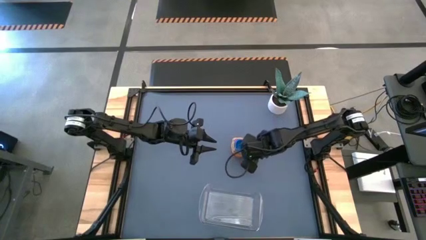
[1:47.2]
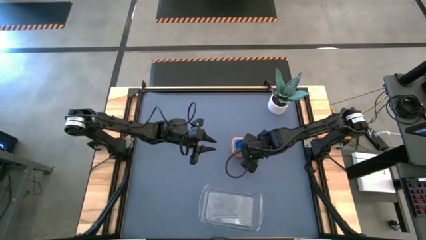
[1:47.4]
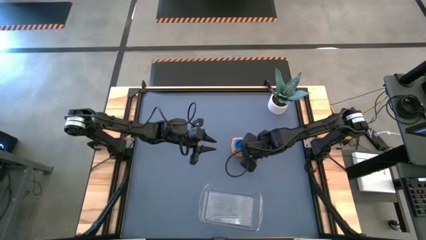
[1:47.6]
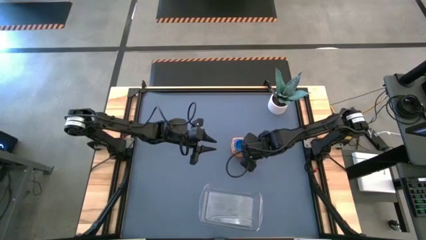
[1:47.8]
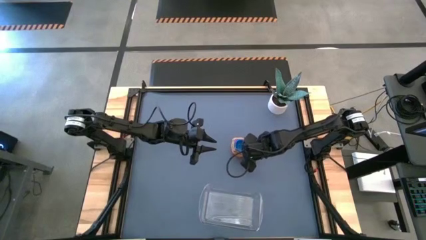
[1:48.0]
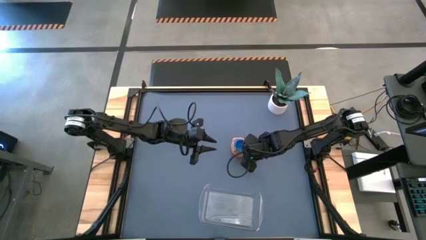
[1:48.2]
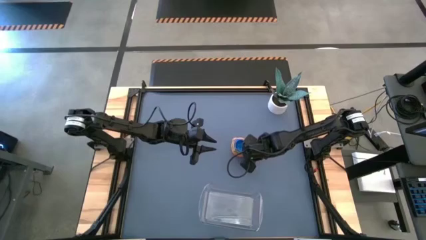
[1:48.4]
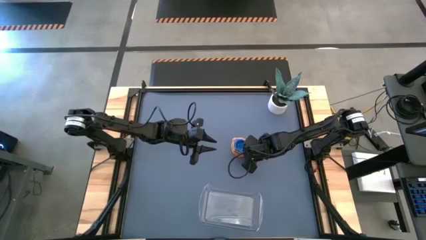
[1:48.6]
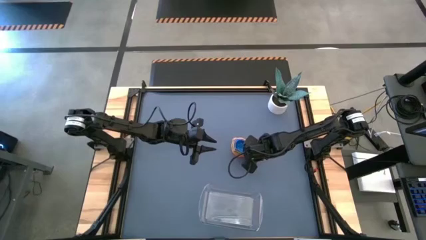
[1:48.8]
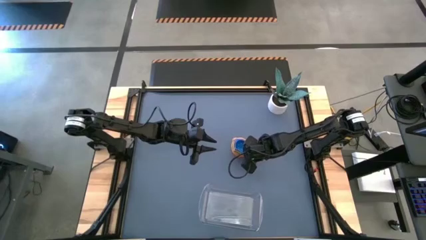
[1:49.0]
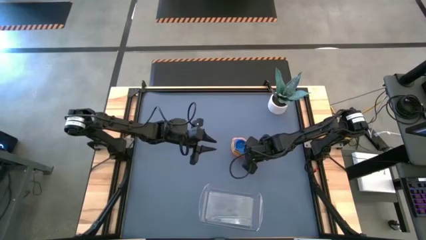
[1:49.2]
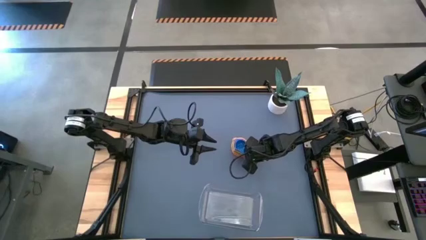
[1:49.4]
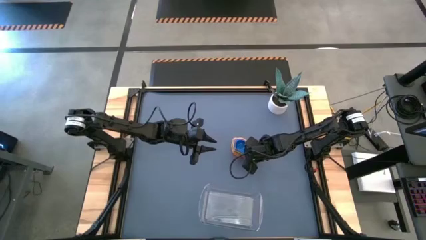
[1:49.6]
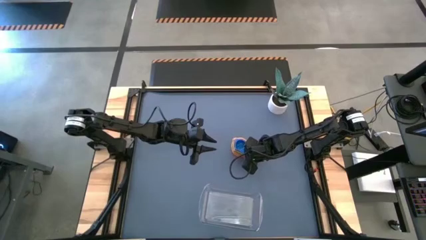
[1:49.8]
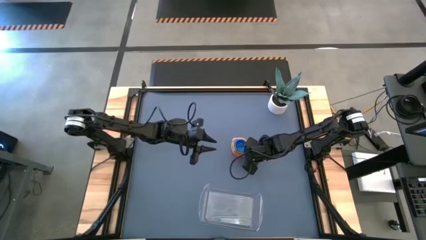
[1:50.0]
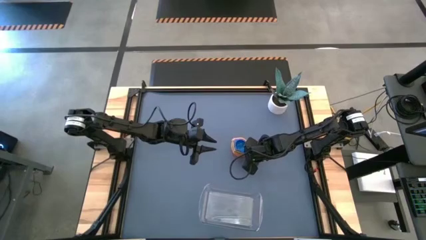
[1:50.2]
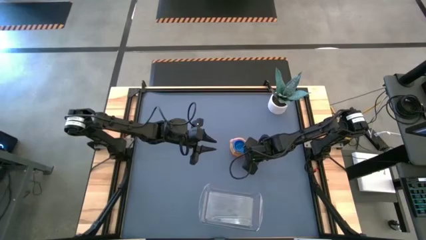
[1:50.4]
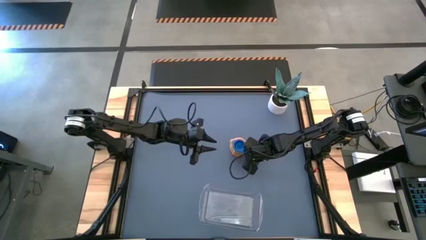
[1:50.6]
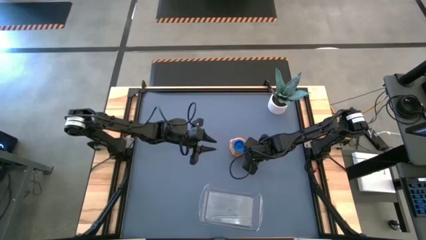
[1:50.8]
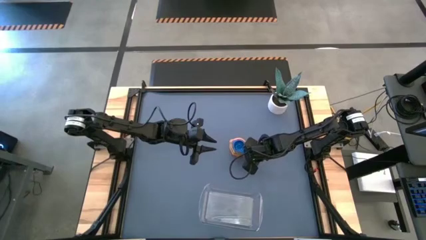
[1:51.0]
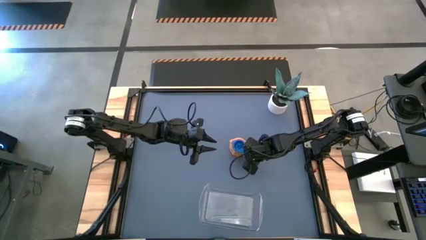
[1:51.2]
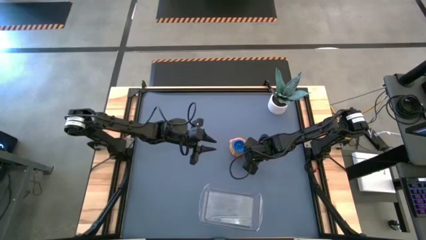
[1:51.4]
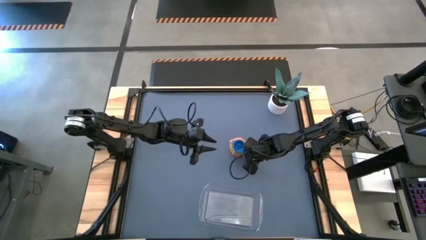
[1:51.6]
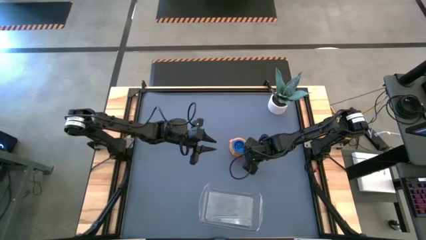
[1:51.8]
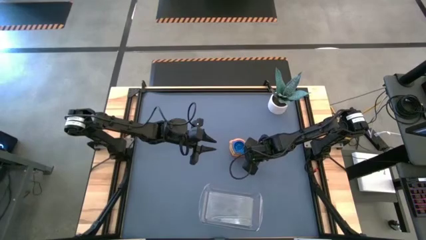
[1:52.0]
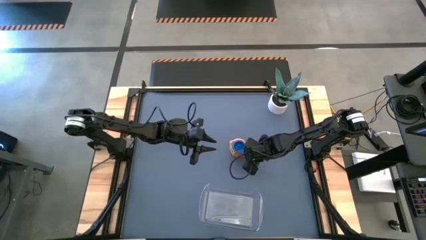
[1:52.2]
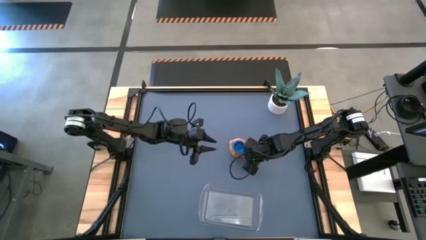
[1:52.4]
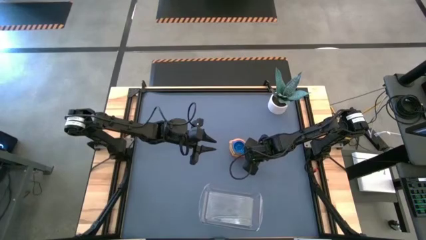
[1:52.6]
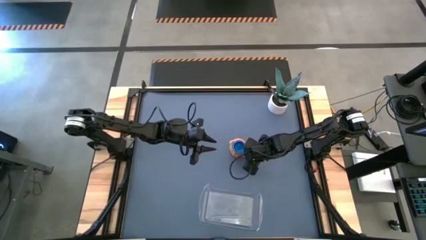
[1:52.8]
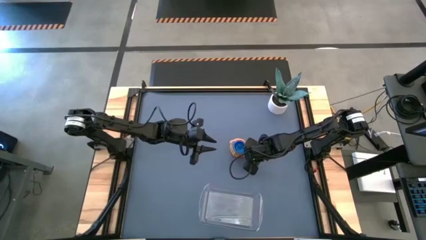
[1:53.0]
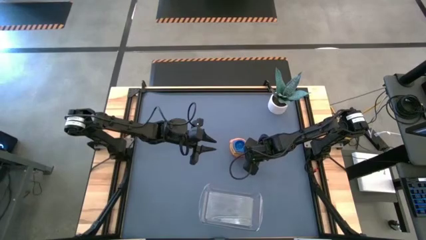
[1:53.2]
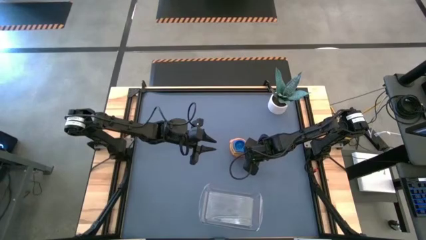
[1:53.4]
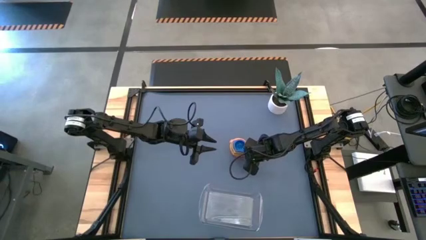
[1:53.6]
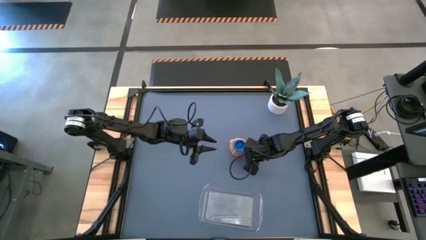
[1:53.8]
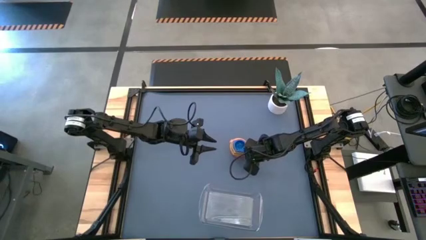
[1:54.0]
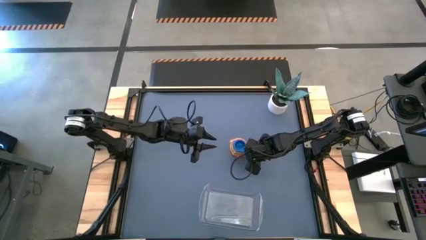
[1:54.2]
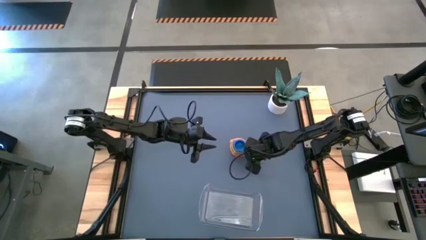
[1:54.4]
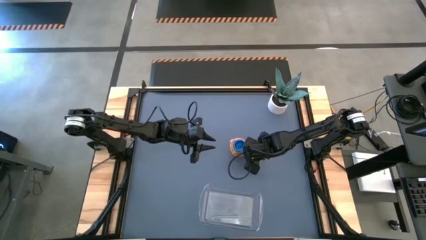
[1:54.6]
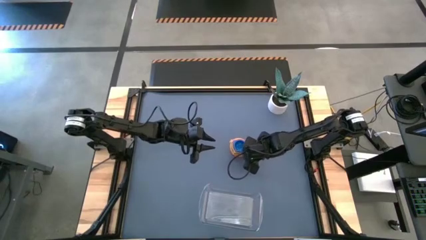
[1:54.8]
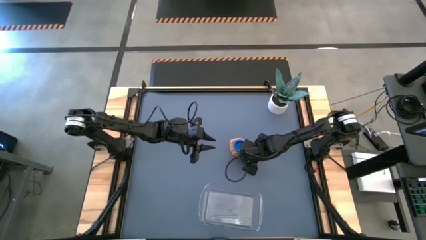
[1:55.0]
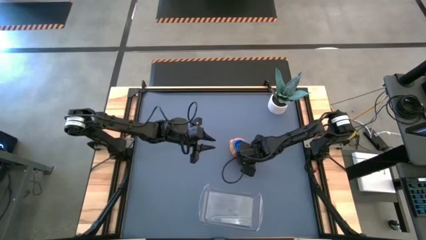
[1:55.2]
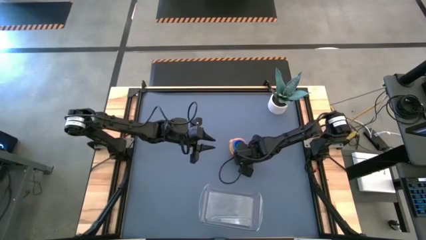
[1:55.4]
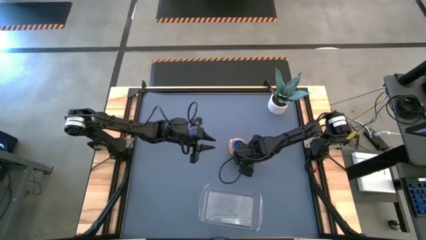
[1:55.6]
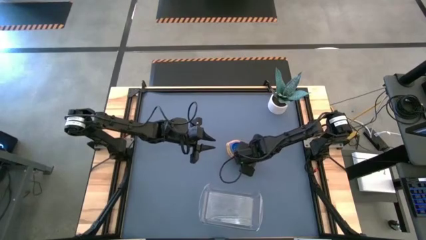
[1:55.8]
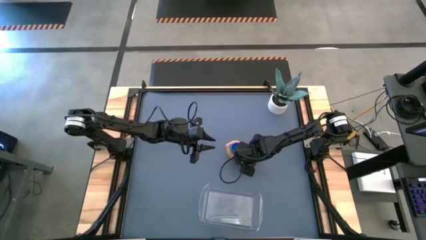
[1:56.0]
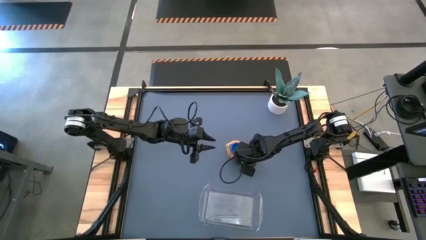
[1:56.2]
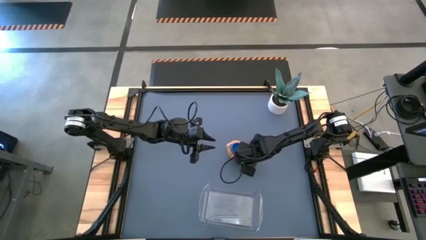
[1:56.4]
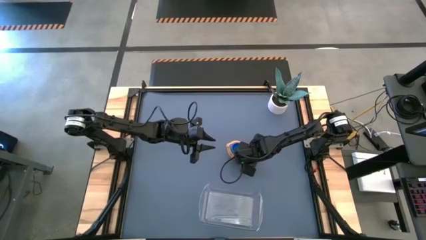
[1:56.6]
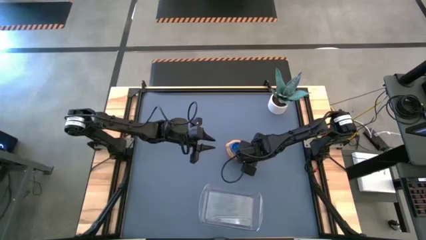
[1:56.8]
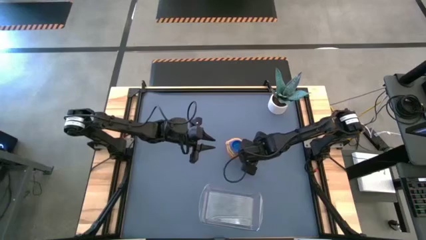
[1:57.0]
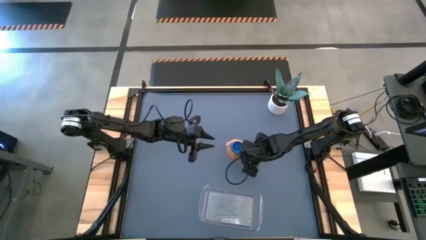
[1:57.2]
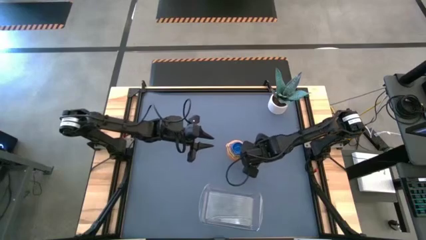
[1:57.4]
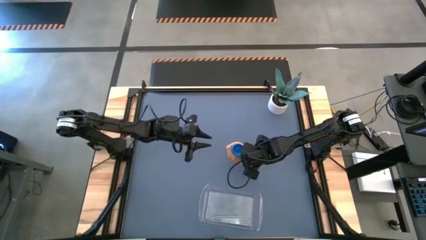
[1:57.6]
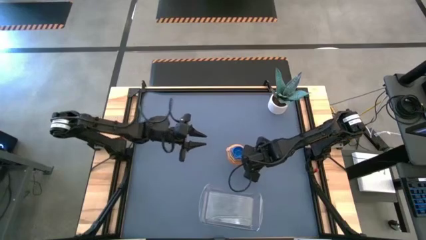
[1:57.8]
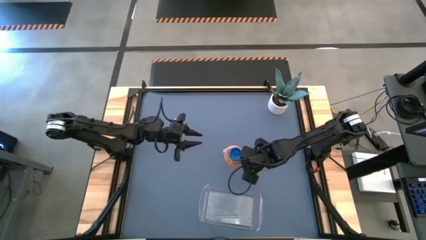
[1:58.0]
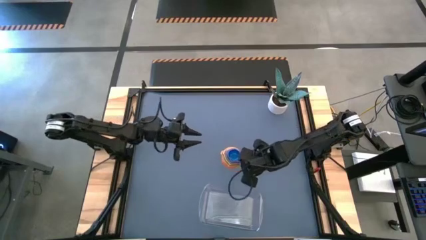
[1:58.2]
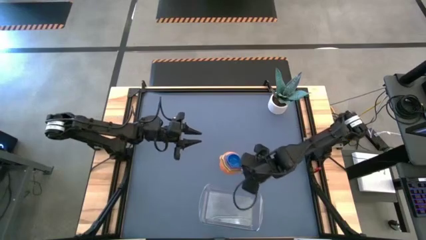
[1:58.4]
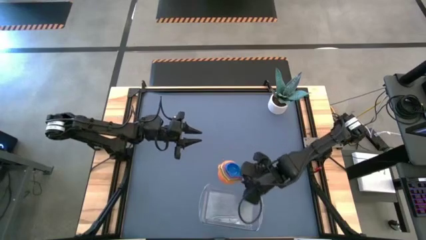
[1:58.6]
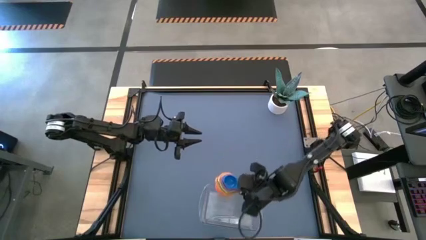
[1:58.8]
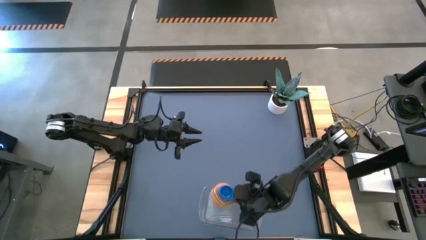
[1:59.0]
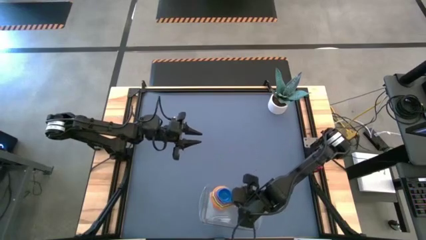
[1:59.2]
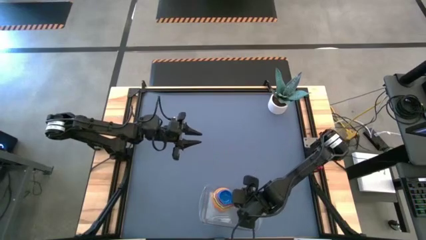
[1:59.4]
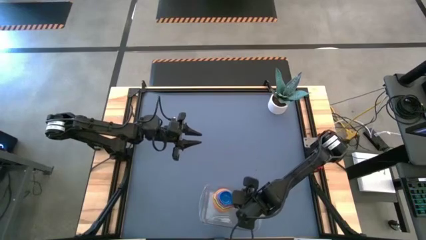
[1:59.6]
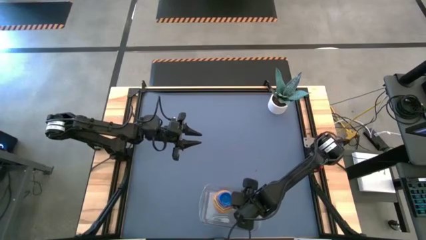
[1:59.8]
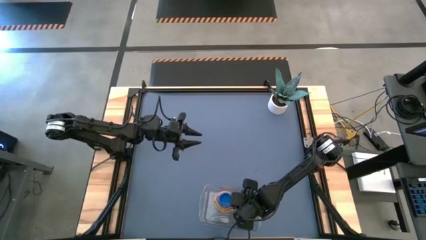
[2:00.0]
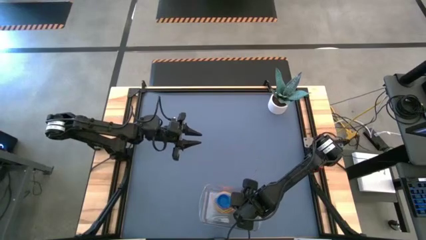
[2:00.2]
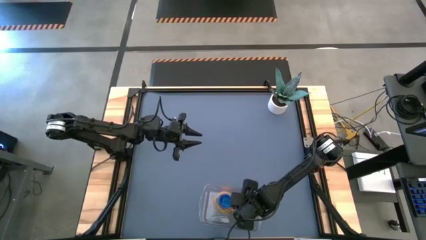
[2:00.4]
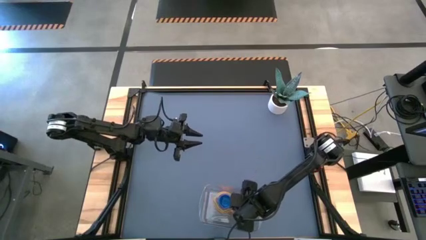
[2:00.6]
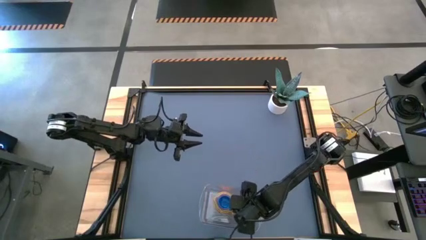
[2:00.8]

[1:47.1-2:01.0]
Task: Nest measuring cups in basket
Put the stacked measuring cups on top of the transparent bin

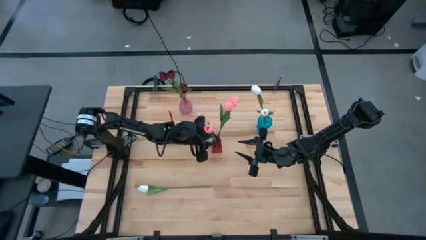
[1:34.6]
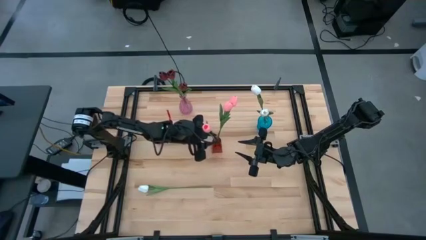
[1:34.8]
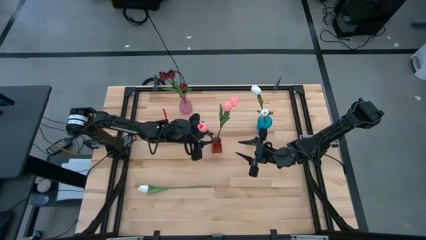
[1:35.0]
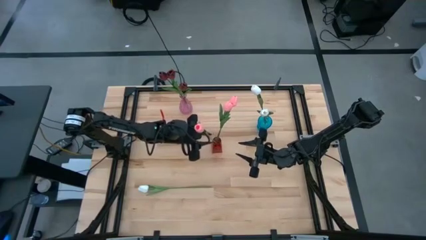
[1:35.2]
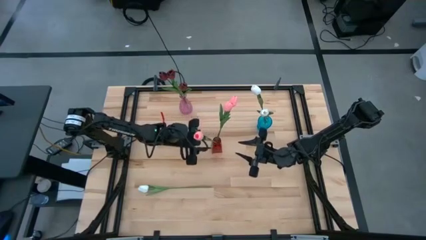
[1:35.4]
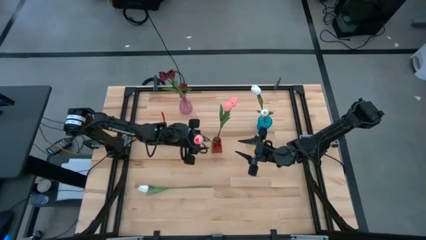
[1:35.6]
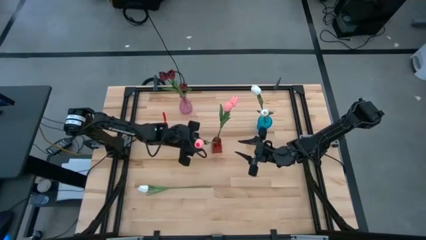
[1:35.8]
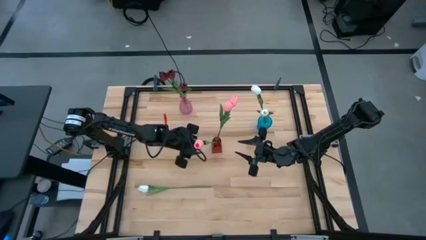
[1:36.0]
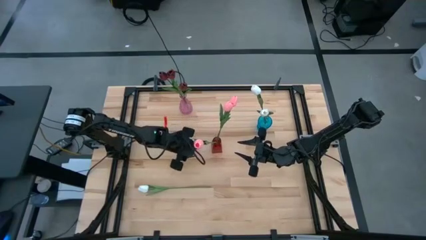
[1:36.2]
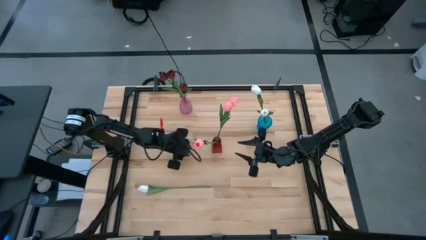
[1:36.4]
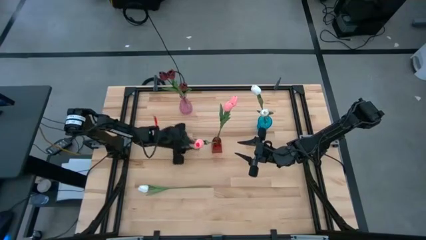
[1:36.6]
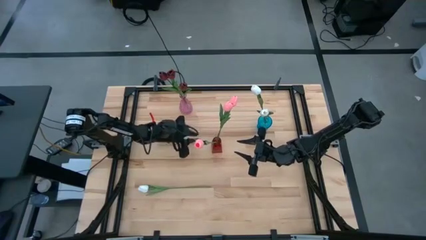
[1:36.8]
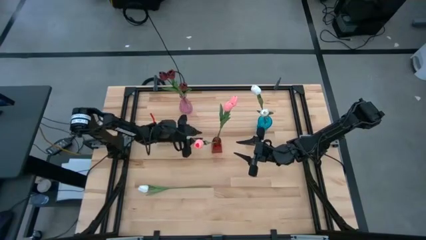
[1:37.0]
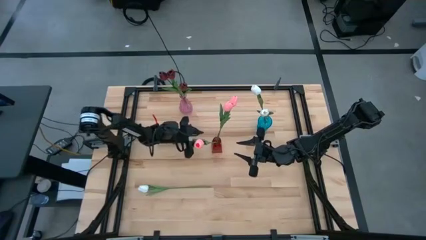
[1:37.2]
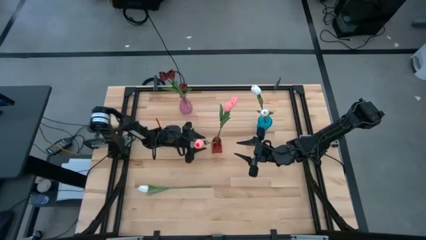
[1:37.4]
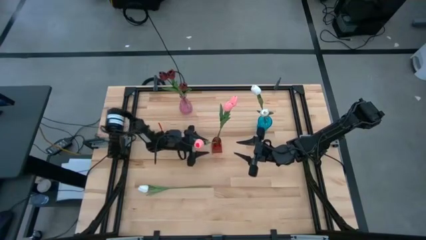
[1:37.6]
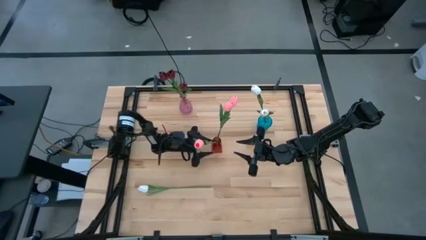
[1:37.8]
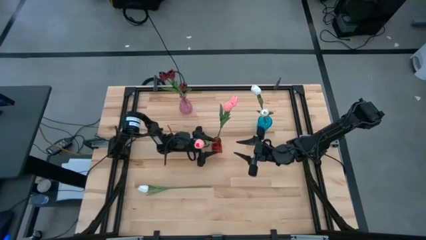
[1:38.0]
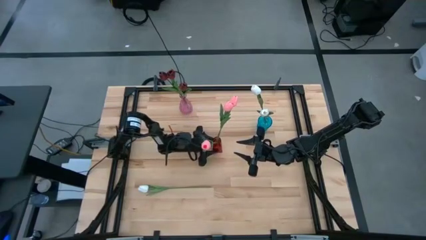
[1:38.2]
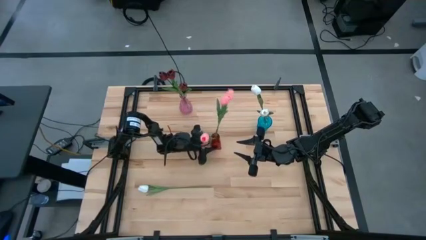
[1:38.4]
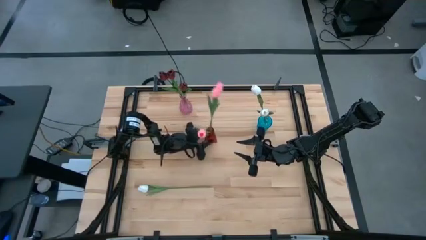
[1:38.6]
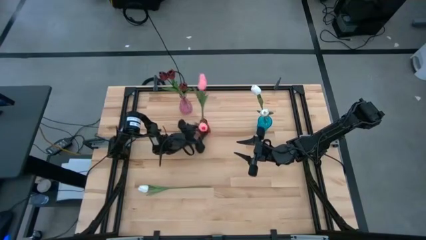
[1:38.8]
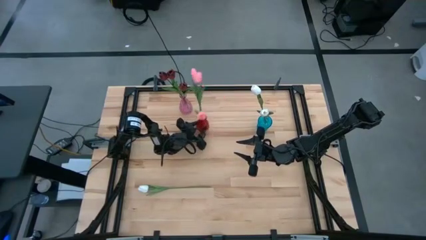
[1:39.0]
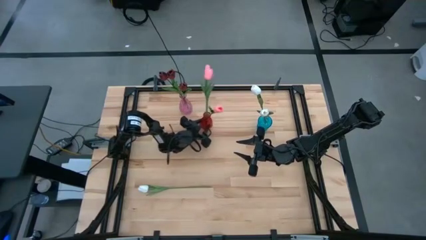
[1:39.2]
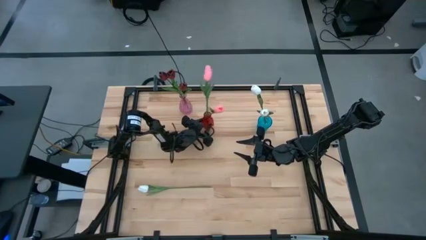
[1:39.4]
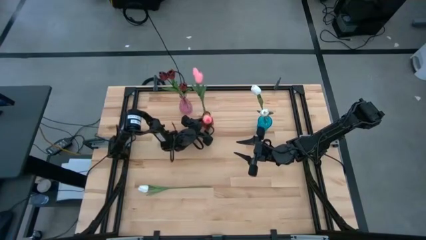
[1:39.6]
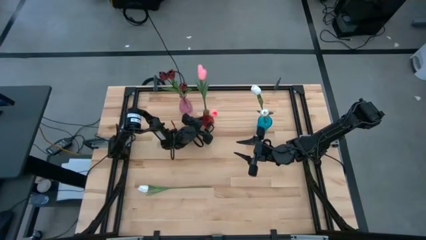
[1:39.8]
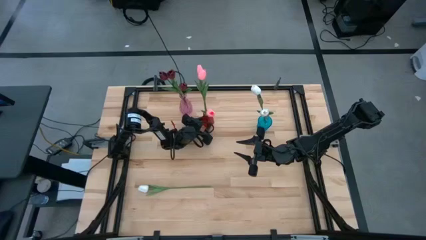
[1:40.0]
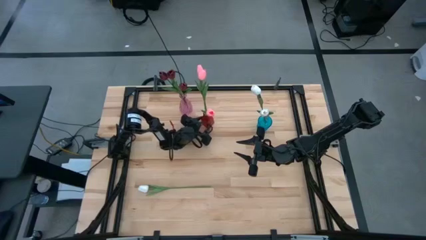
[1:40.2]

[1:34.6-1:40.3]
Task: Sort flowers into vase by color
Adjust the red vase
